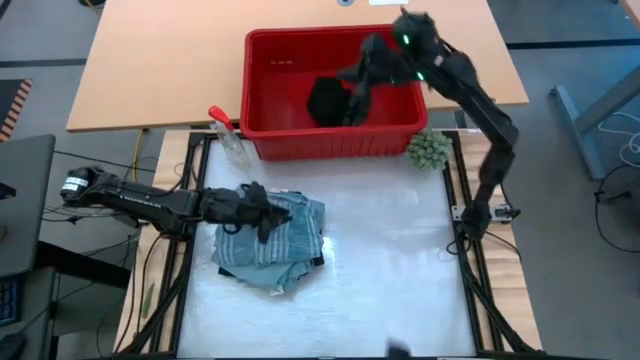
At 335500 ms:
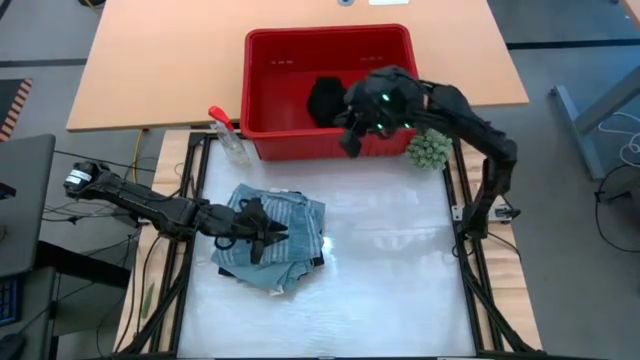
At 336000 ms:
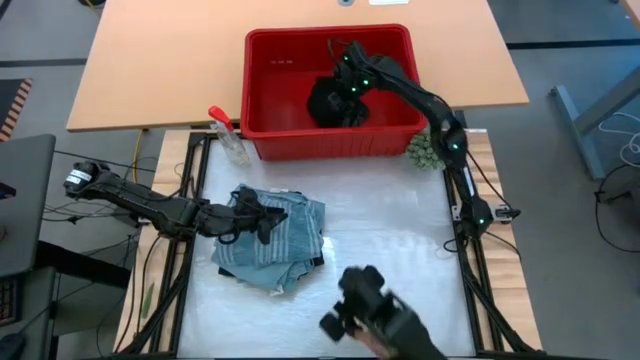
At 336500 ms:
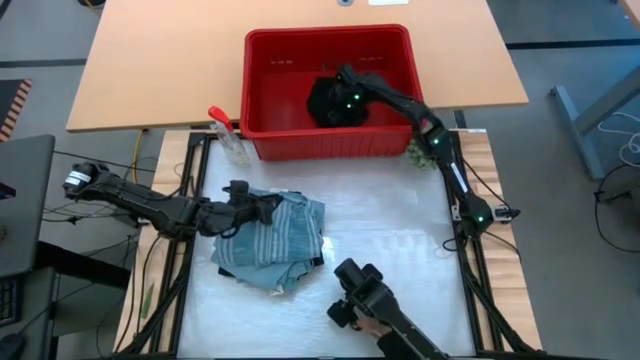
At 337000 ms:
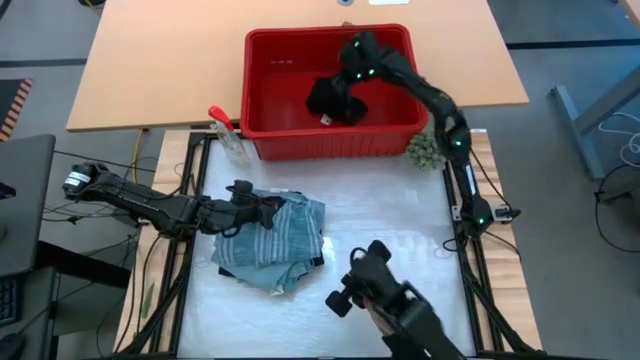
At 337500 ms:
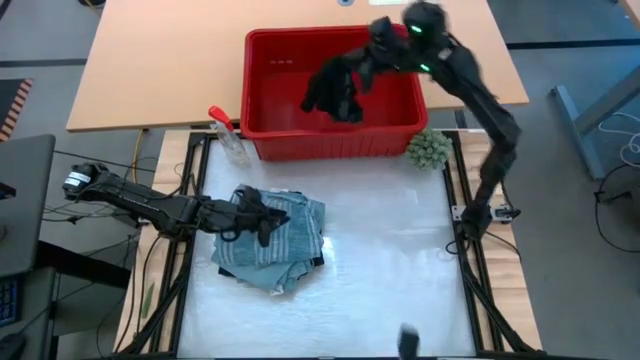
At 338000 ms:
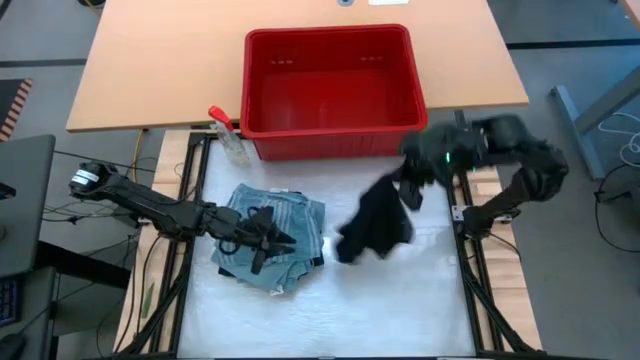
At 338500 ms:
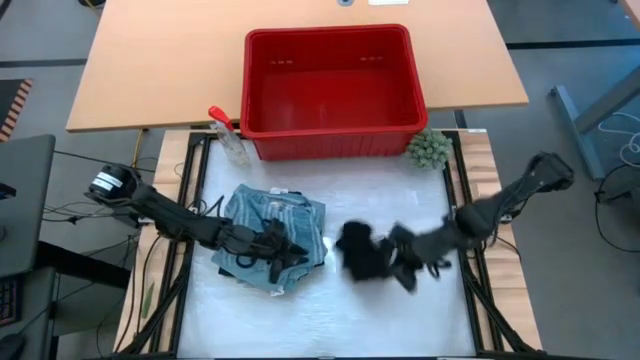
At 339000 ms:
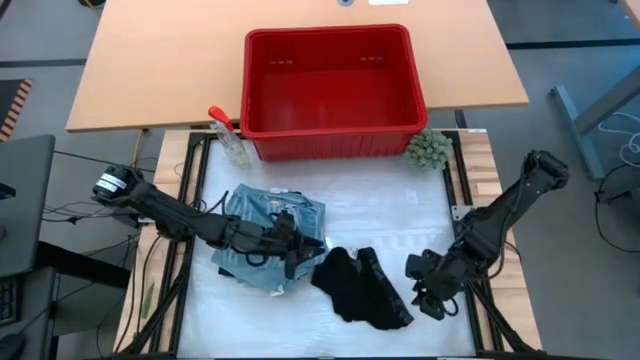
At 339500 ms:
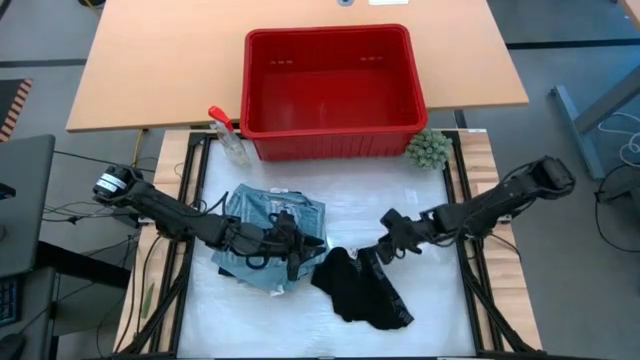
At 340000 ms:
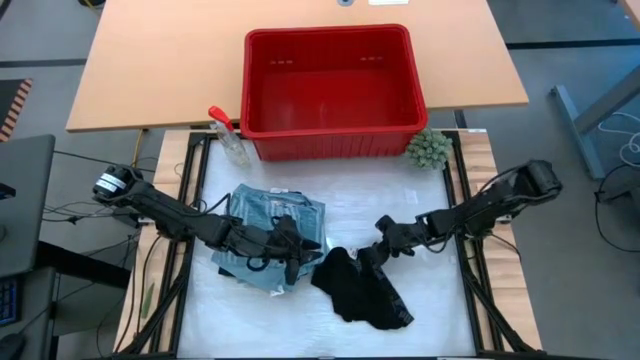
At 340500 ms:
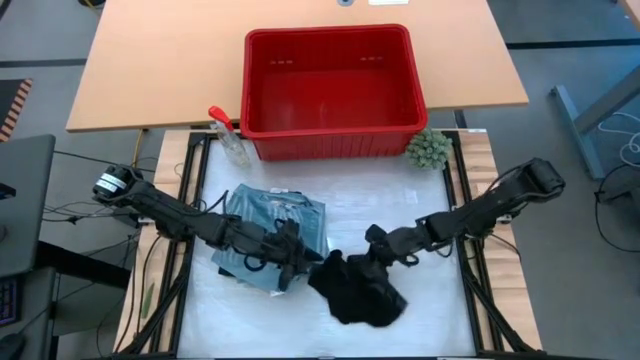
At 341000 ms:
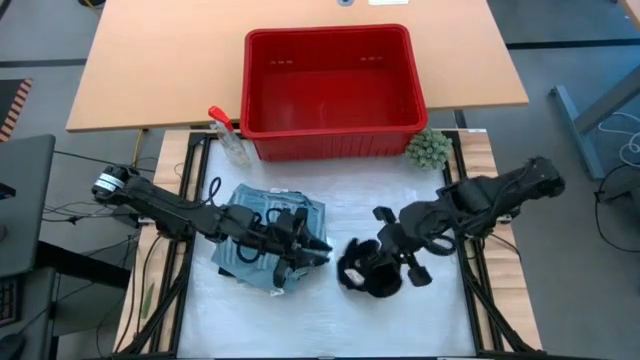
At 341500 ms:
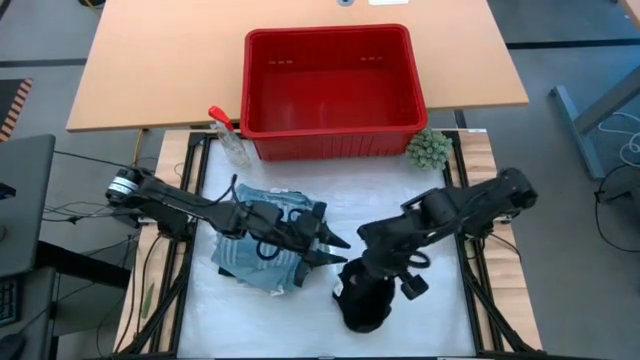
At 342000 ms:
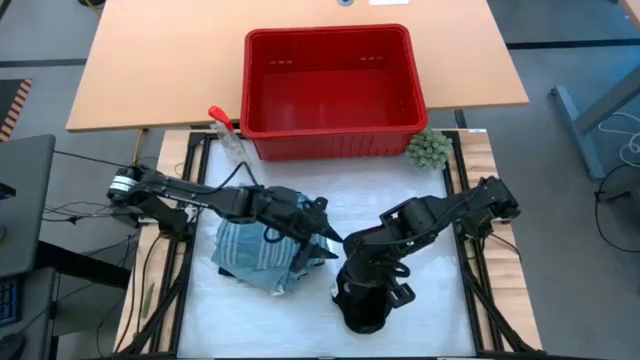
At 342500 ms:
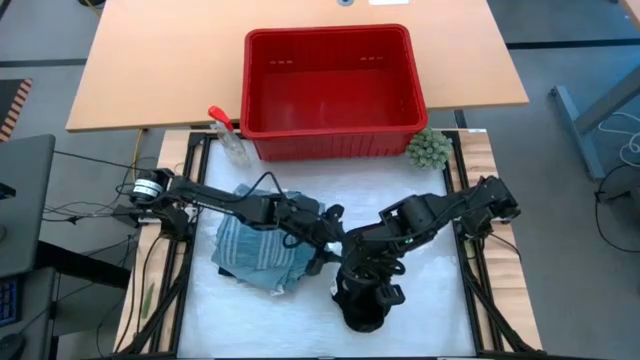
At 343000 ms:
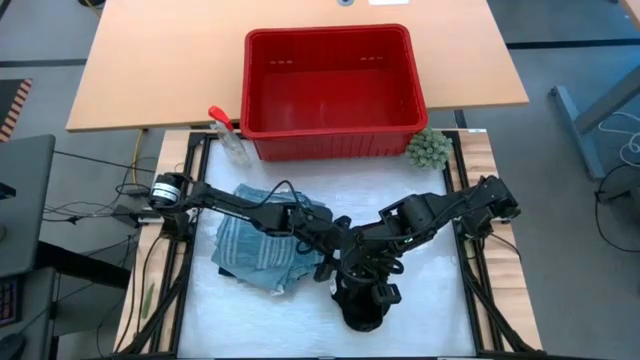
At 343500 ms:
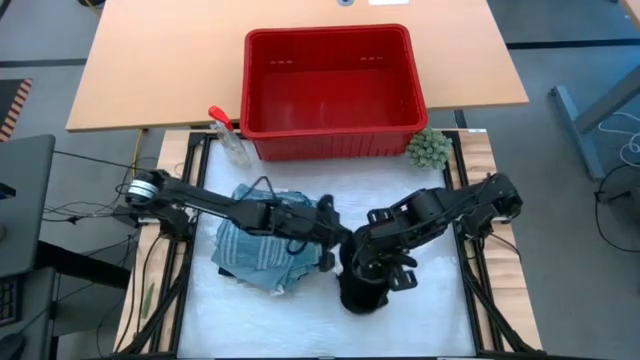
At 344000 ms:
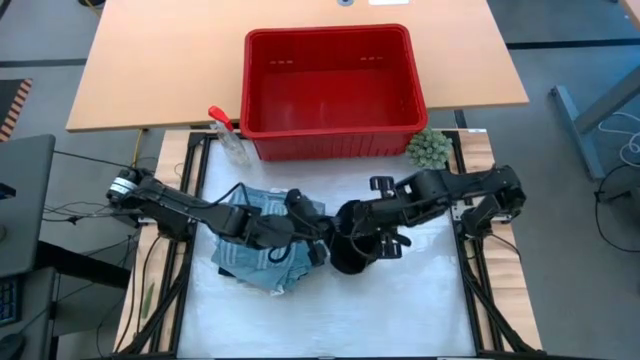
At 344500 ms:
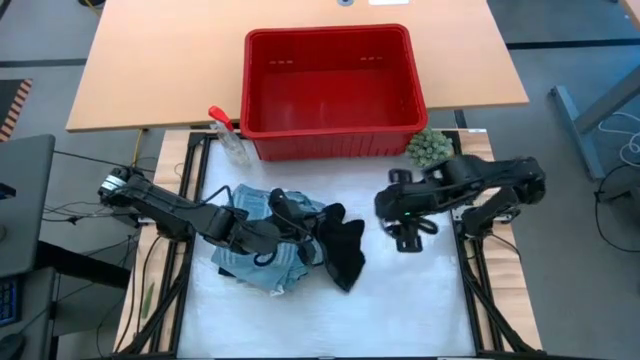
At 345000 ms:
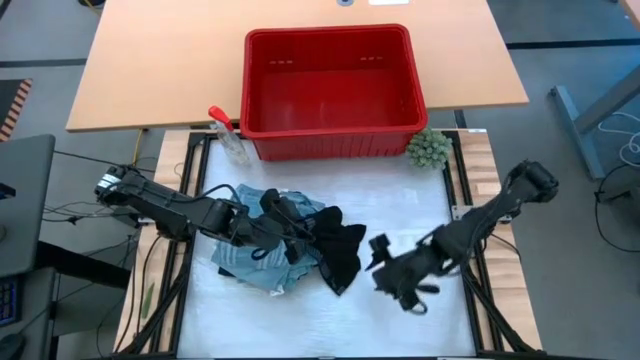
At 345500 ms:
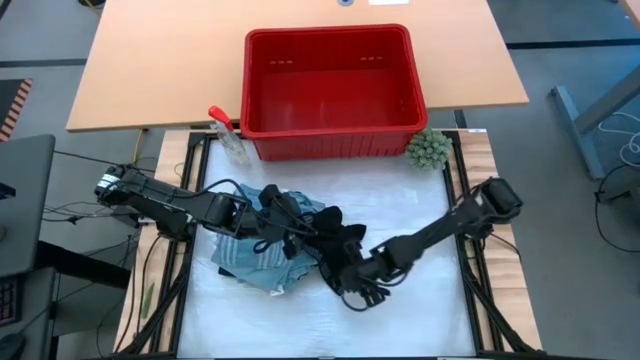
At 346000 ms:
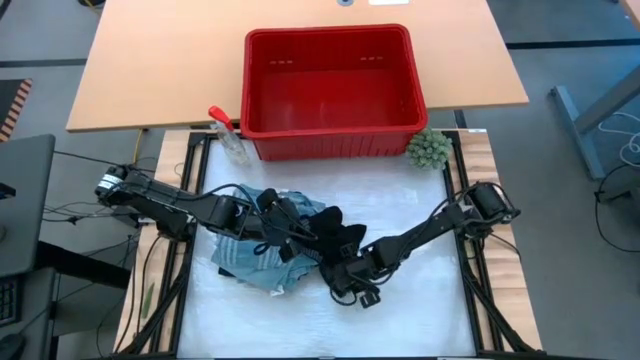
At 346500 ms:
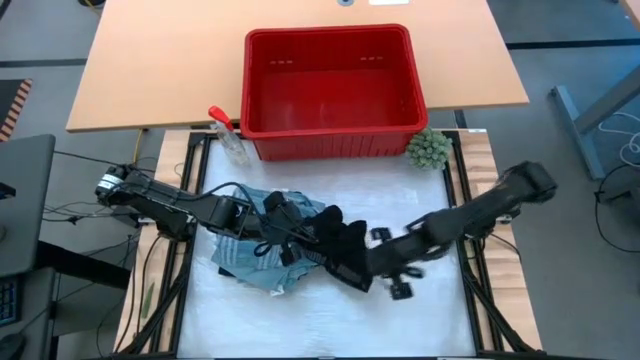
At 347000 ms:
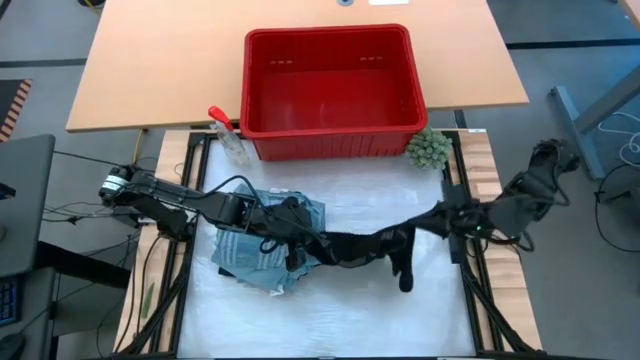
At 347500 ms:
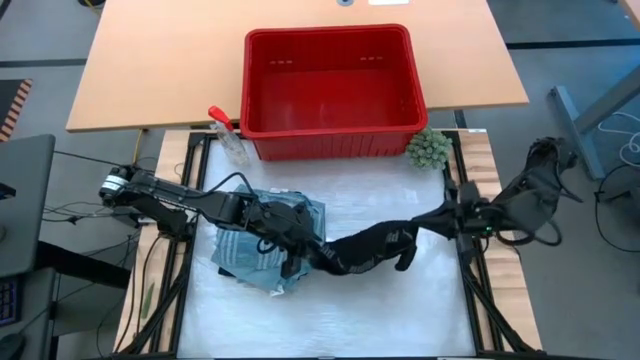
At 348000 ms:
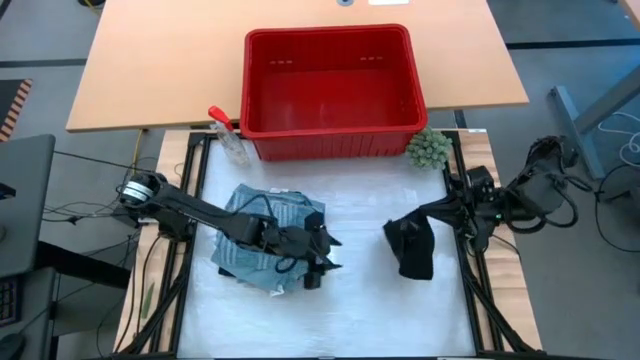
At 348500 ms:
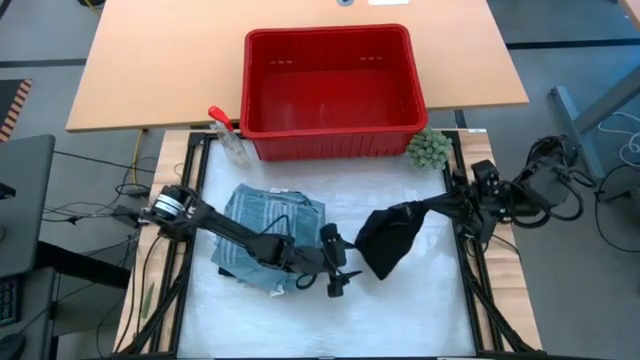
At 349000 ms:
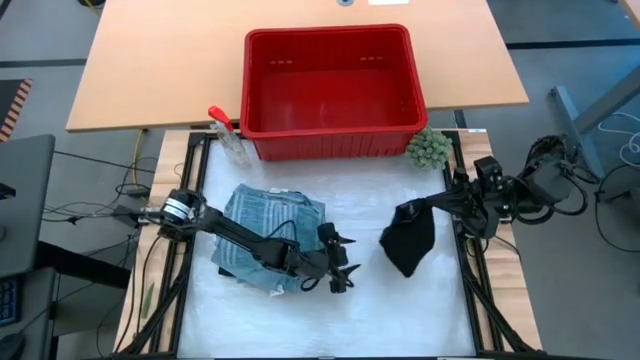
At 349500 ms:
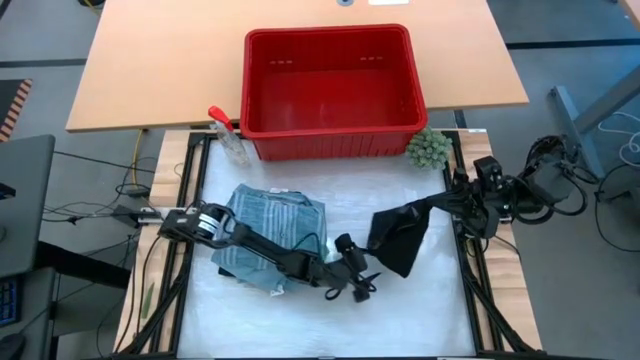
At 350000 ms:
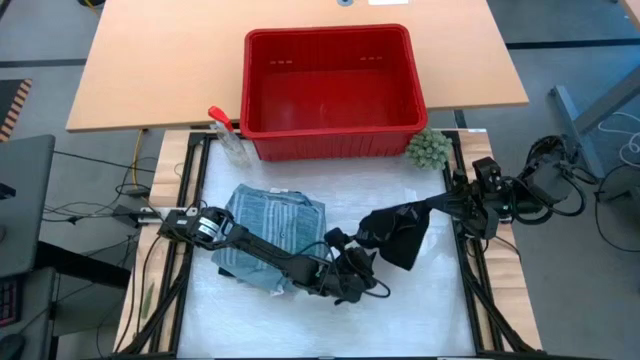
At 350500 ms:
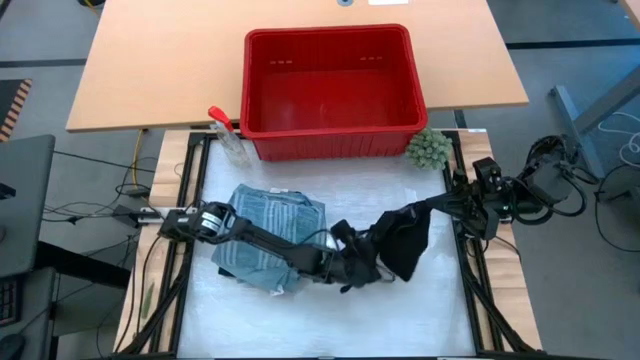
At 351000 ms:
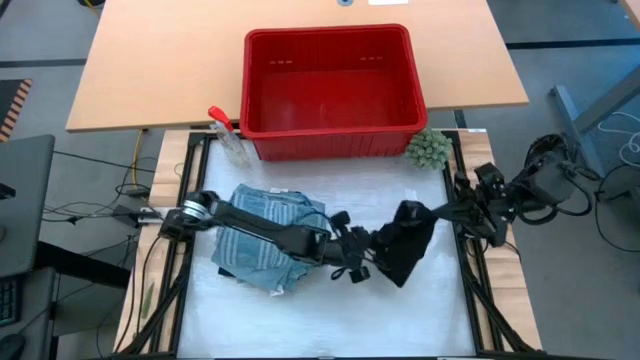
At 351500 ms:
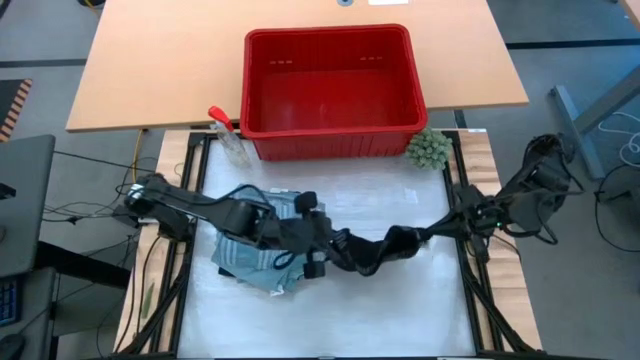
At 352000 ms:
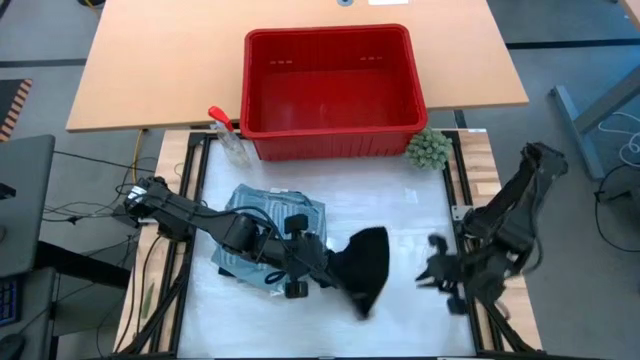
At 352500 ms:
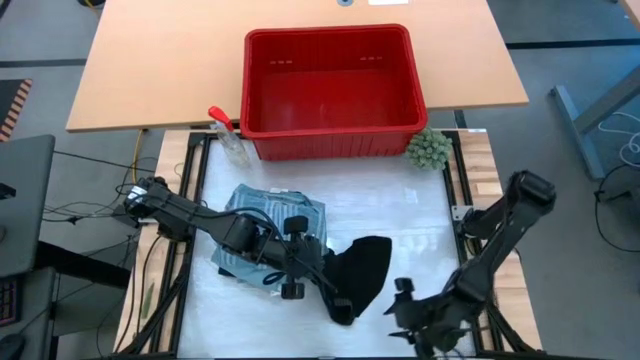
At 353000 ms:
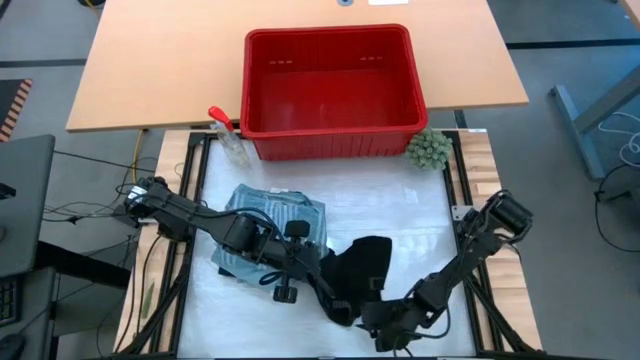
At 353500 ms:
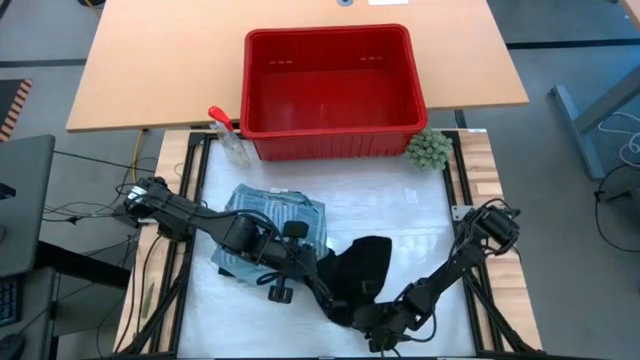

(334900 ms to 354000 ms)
Task: Fold Laundry from Bin
Fold the black underwear

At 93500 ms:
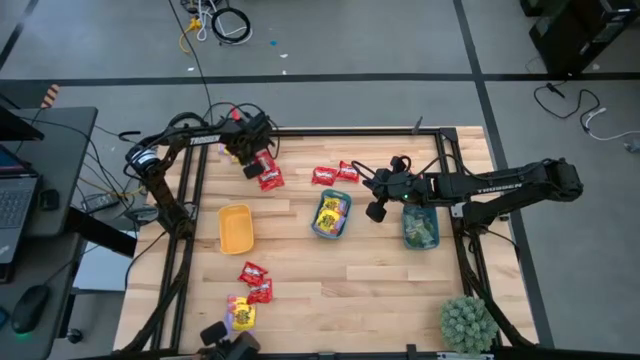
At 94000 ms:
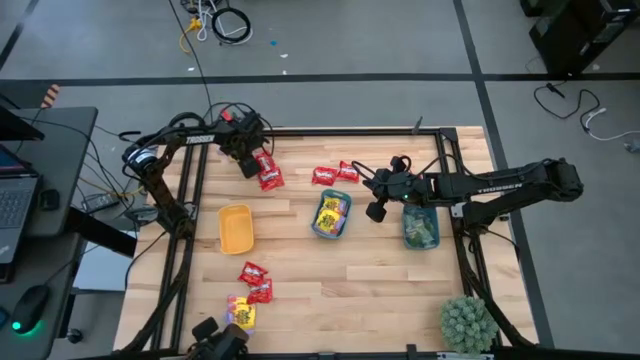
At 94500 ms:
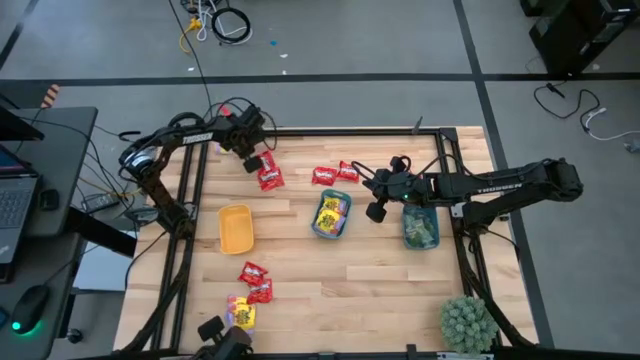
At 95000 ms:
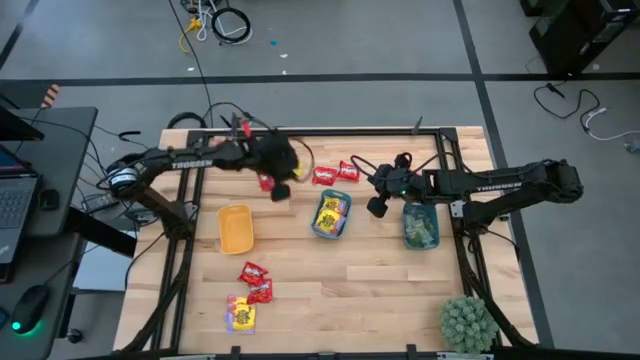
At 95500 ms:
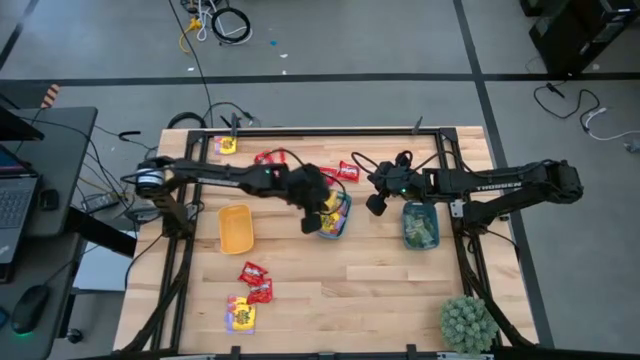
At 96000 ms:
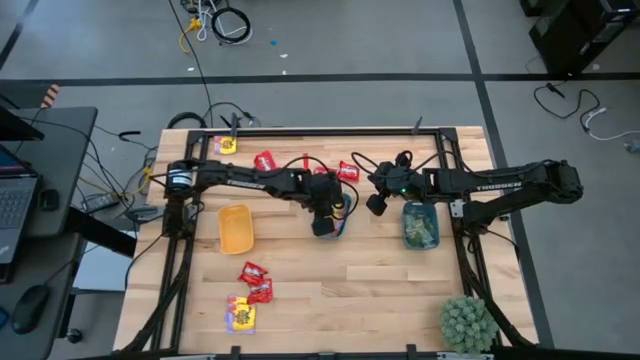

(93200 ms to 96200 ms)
Task: Sort candy
Put the yellow candy pack into the green bin
